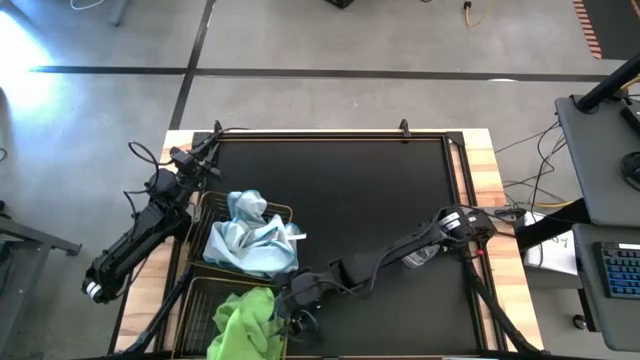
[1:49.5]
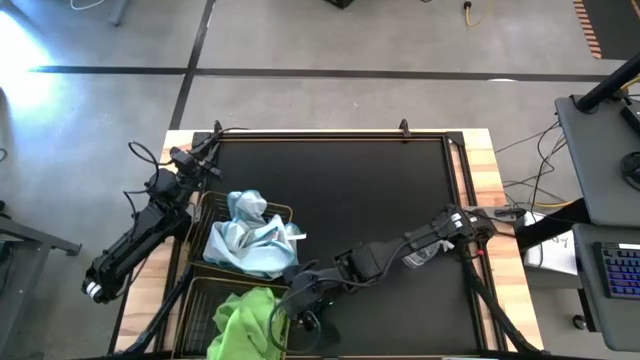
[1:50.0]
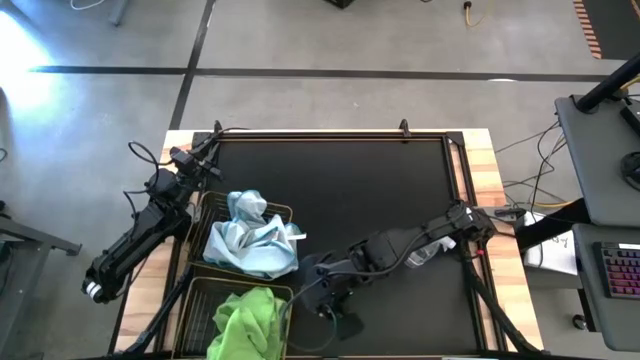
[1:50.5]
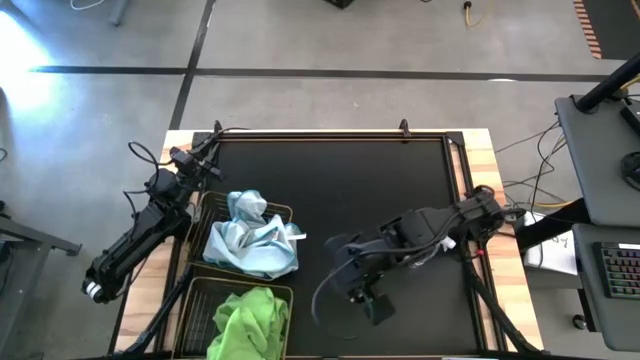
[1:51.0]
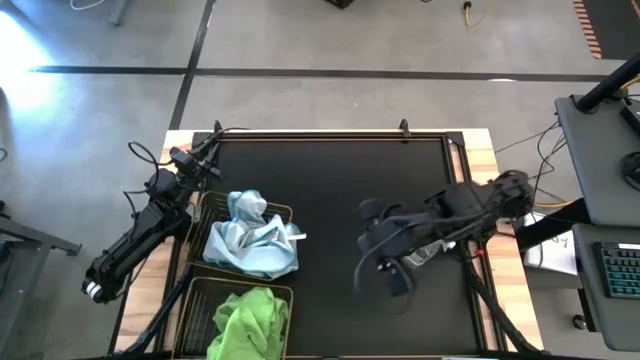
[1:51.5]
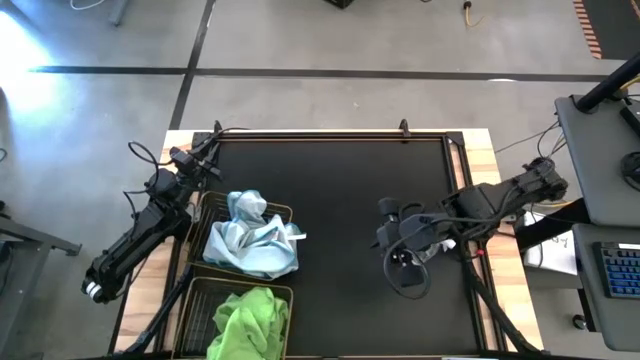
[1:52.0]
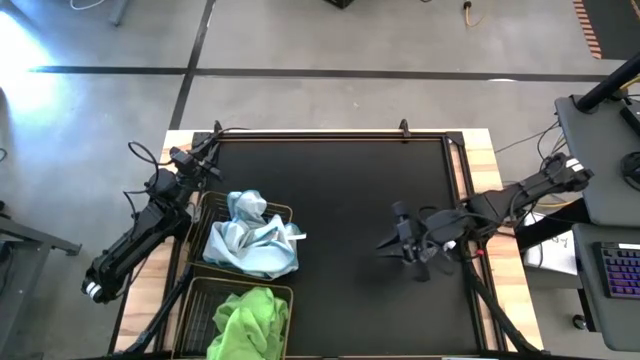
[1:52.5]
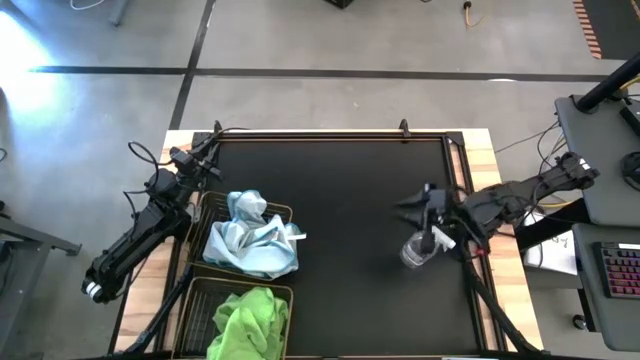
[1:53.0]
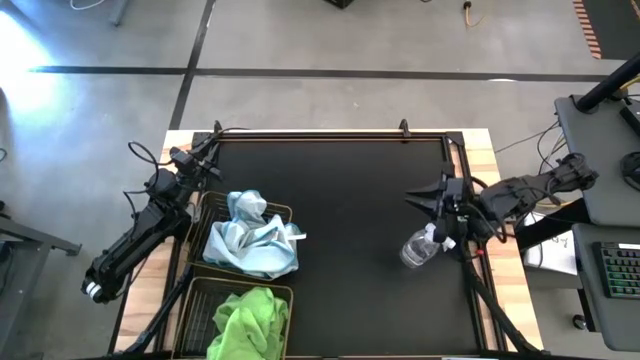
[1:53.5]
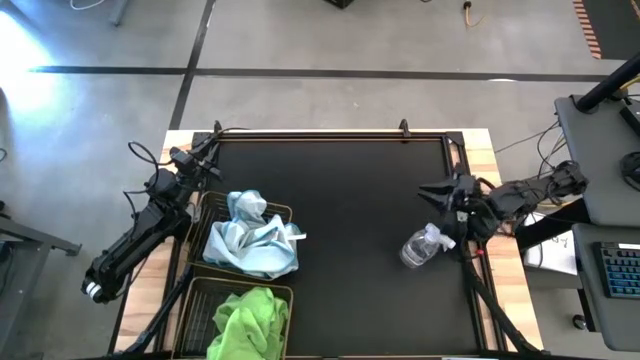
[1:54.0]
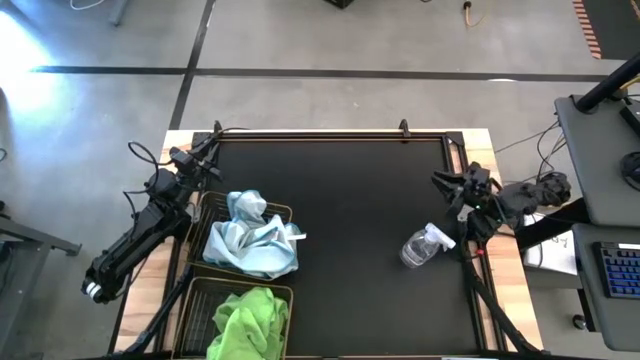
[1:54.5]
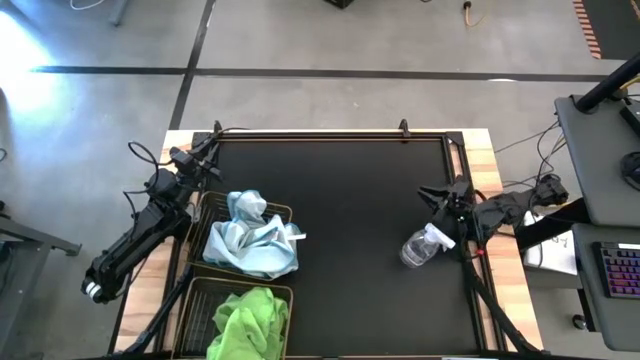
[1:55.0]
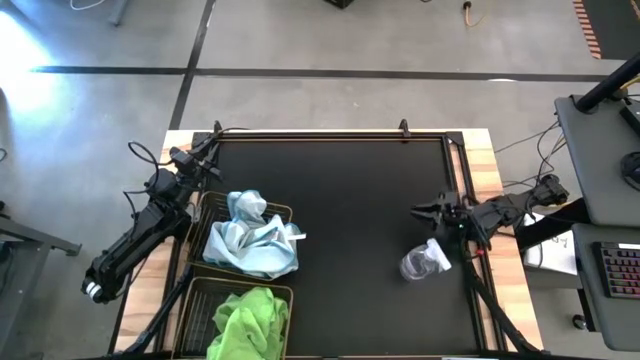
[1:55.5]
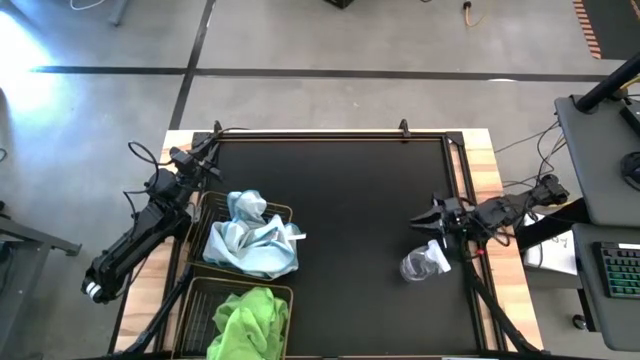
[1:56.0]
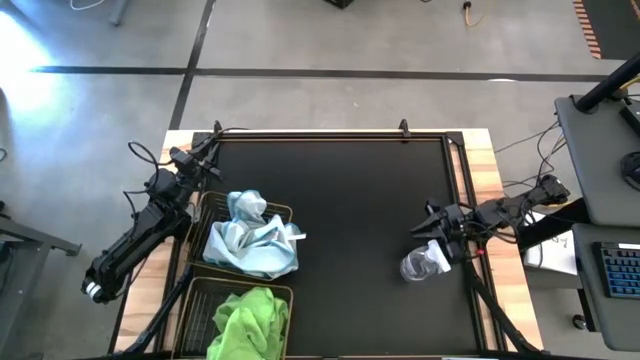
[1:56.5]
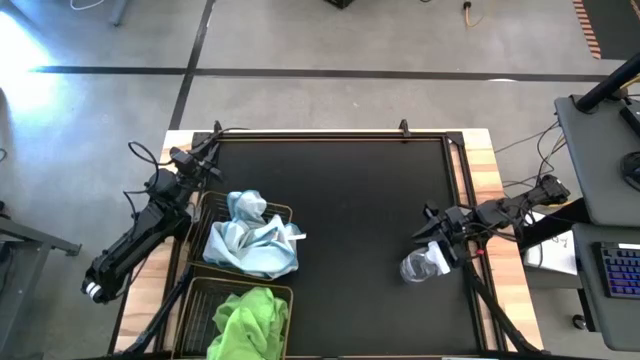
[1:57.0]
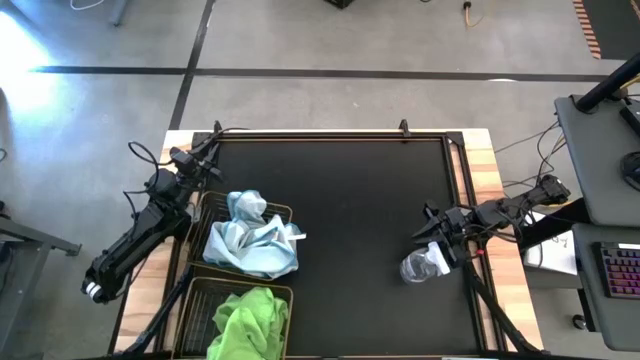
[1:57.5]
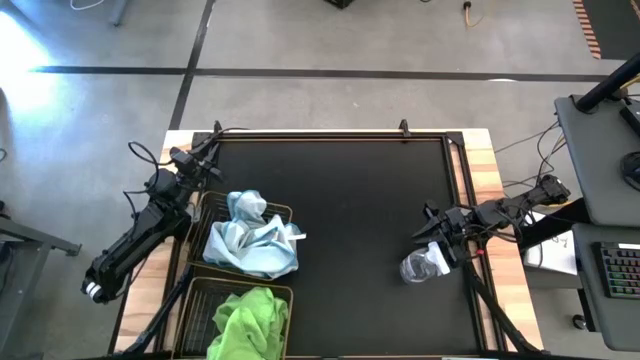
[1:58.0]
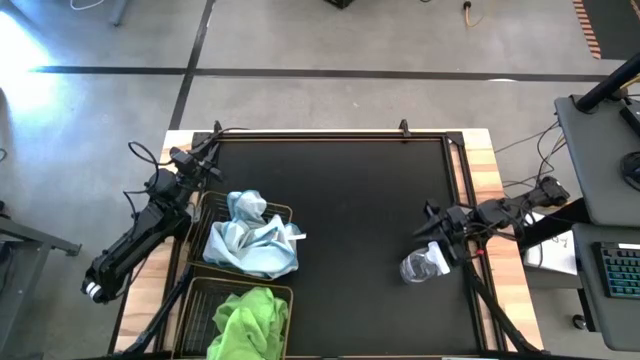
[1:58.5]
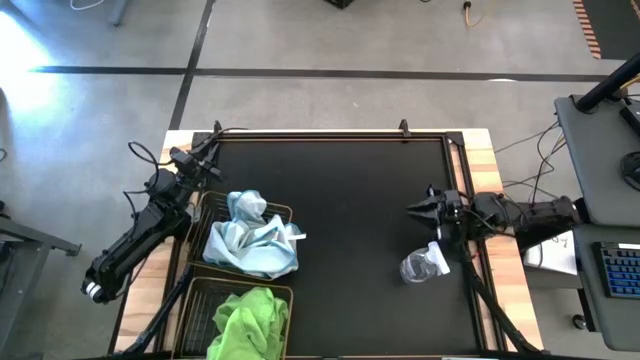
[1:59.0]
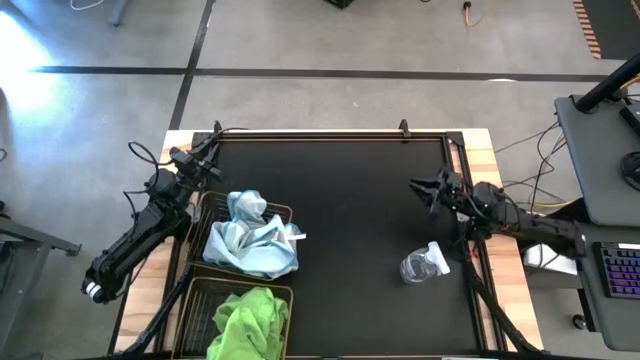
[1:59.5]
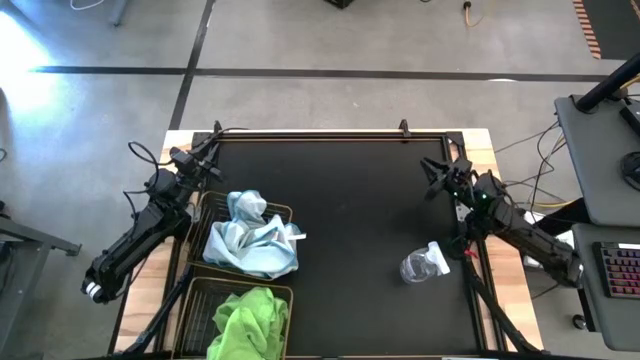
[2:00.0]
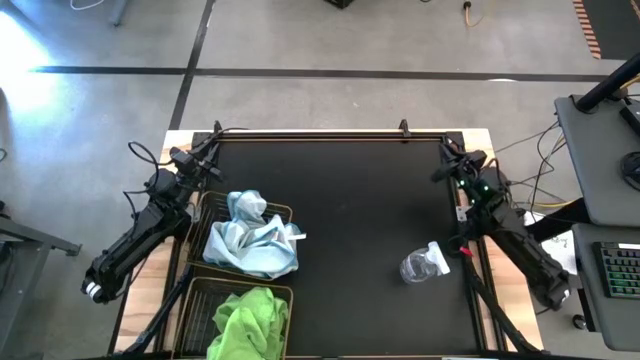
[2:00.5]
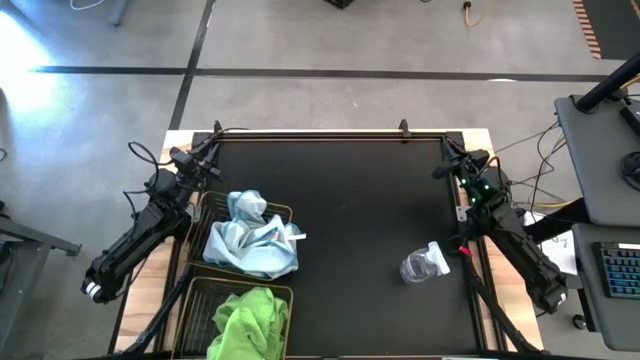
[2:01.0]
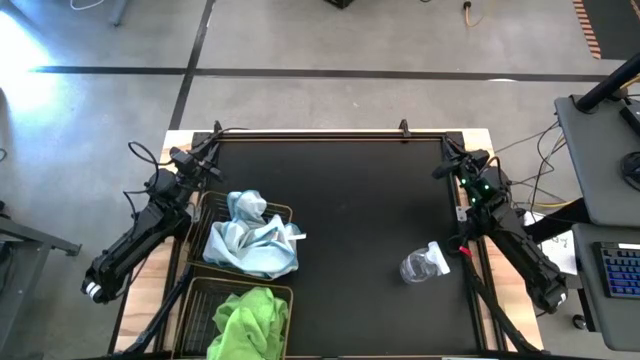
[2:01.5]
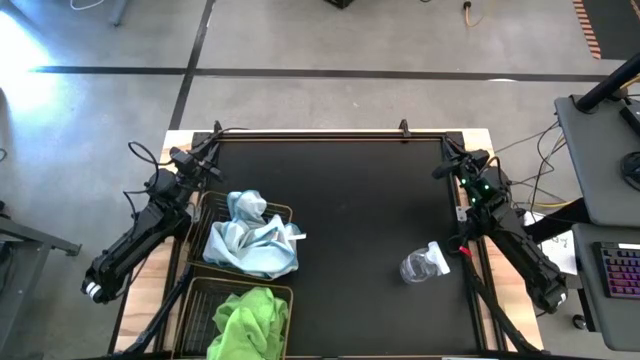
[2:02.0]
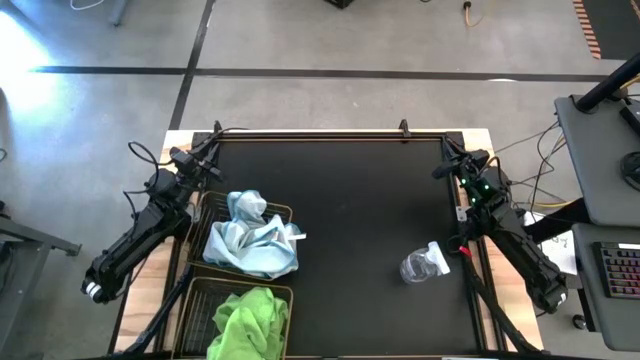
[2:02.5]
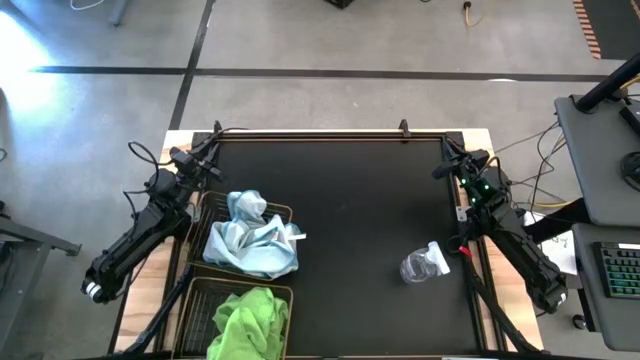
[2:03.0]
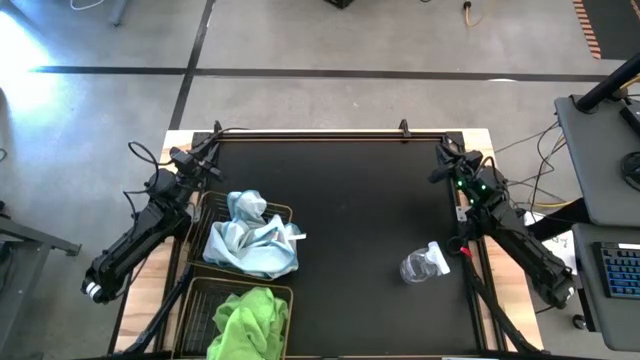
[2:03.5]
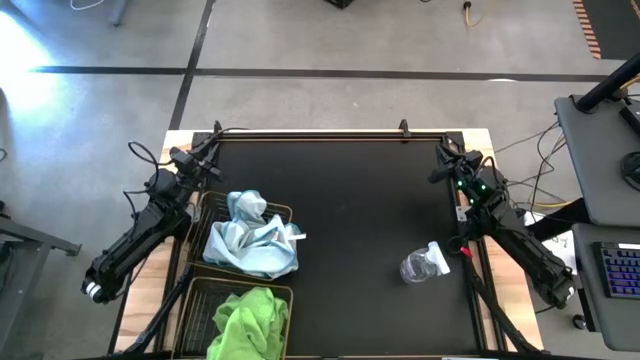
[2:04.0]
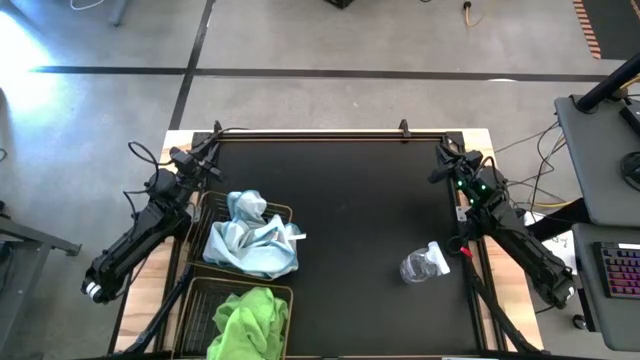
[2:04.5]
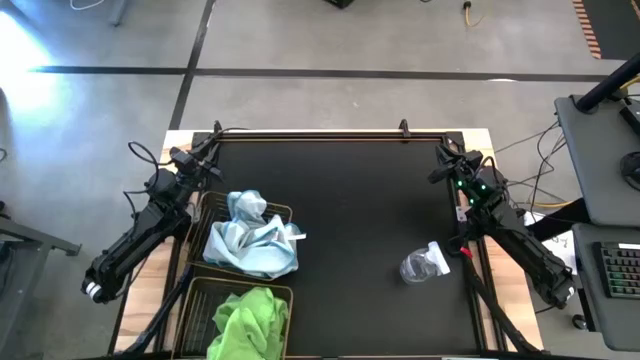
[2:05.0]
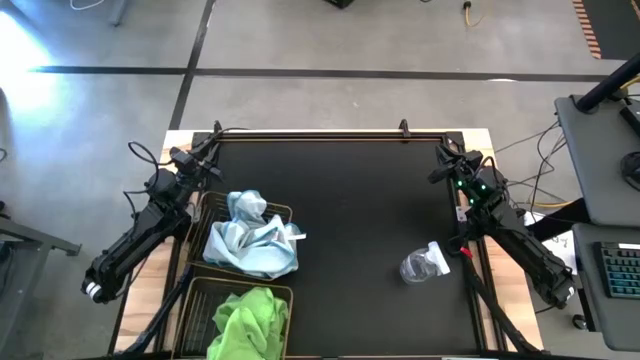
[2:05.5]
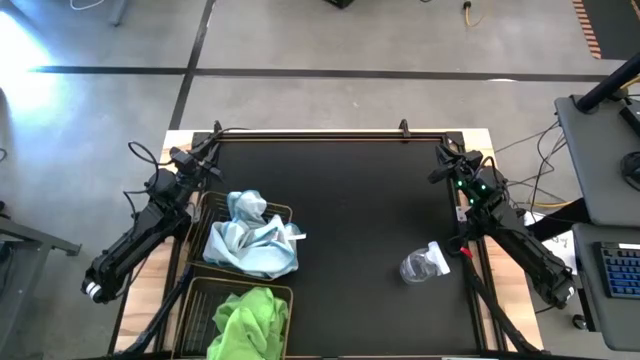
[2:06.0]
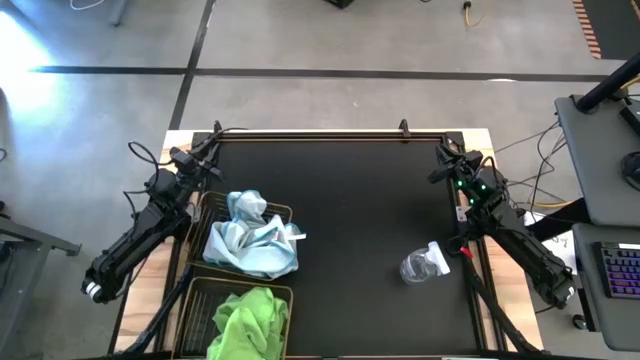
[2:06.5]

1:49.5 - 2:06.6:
Task: Sort microfiber towel by color & place in baskets
Return to Home Position

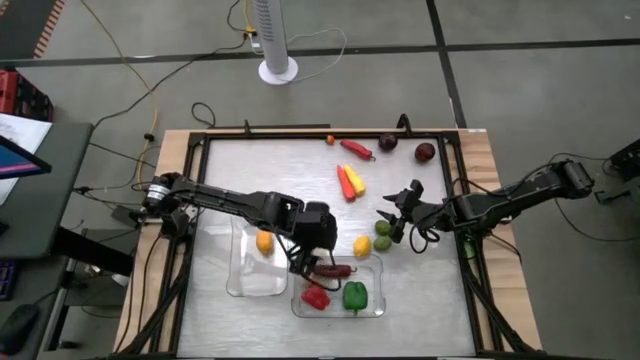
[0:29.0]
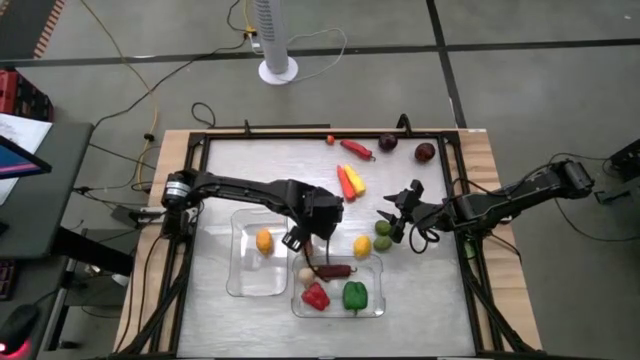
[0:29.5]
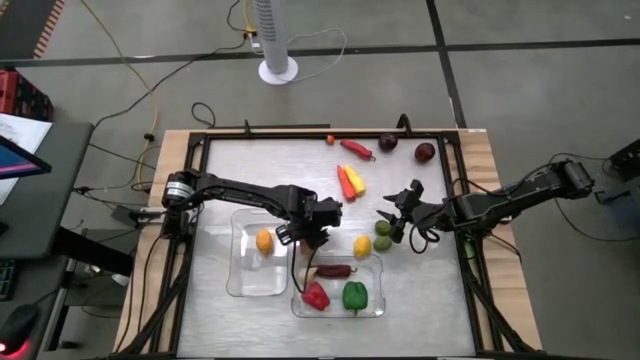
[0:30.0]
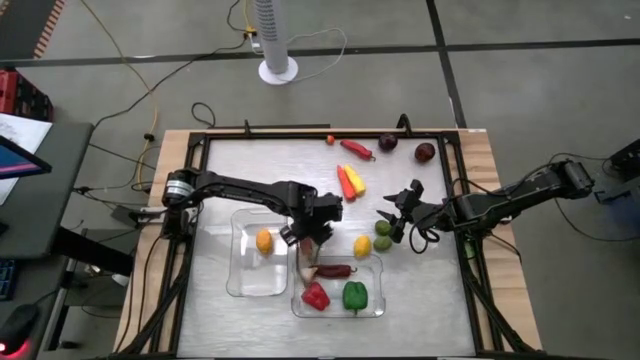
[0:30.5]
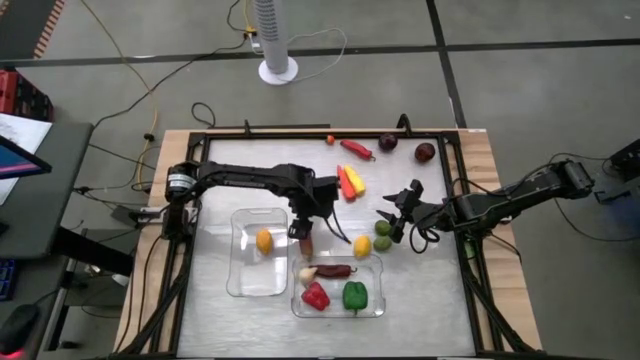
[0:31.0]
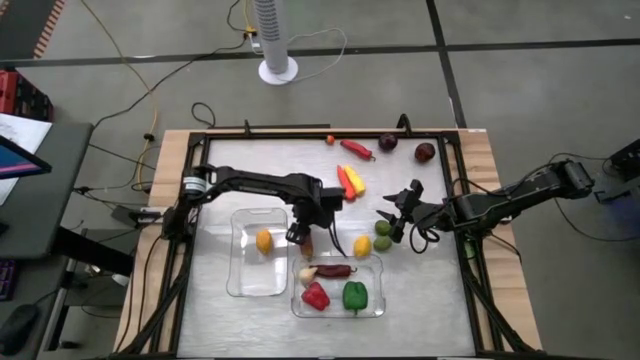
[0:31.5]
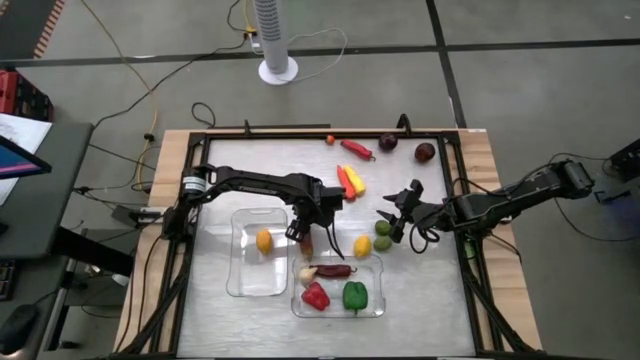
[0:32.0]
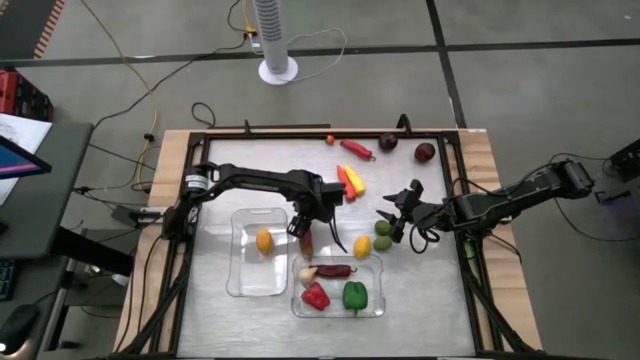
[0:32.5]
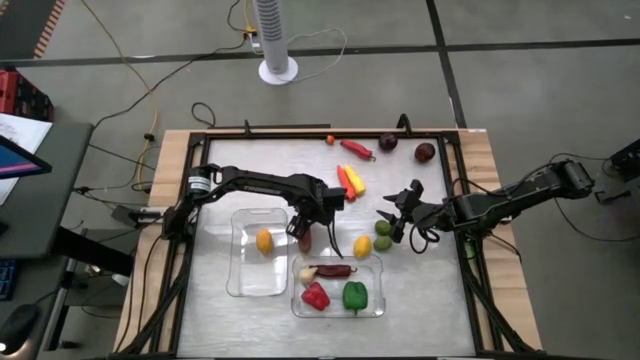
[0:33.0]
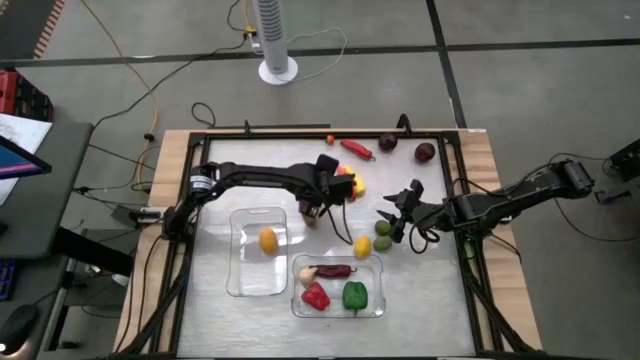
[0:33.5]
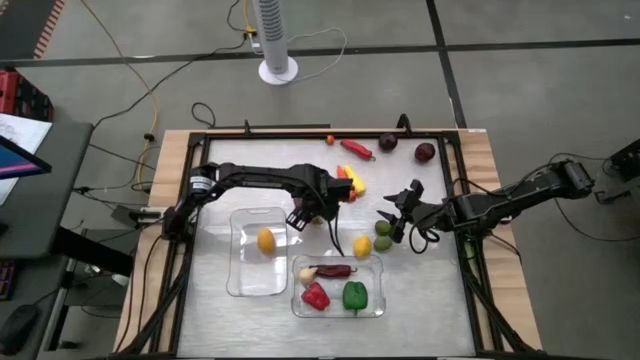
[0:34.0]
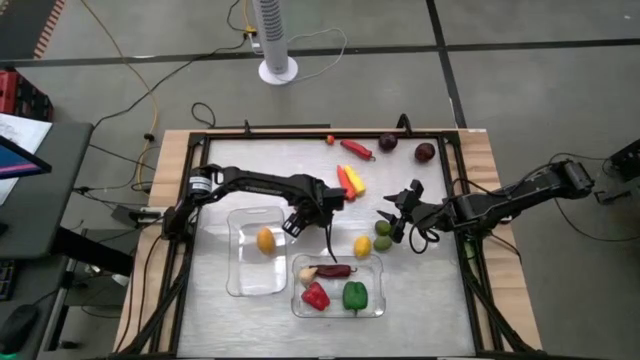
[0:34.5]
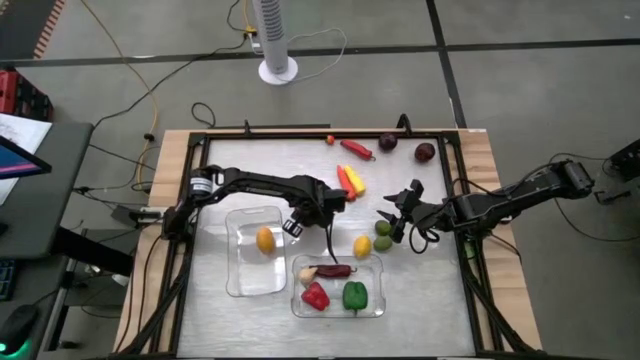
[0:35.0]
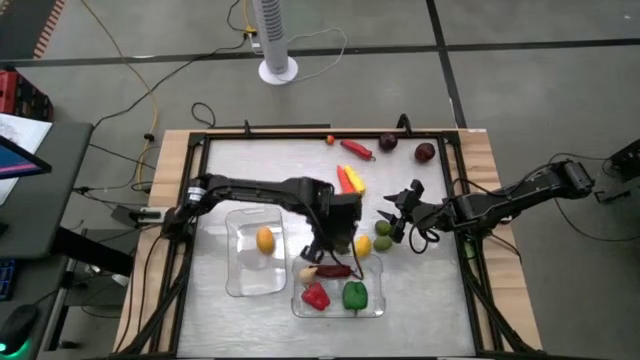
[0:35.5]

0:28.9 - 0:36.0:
Task: Sort produce into baskets
Put the dark red bell pepper into the right transparent bin
